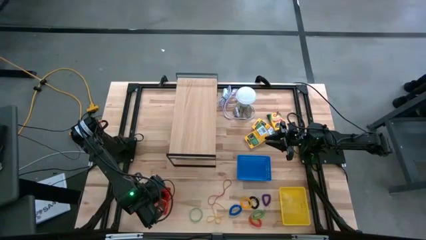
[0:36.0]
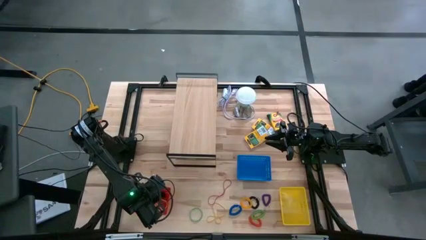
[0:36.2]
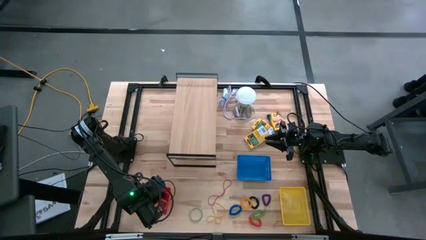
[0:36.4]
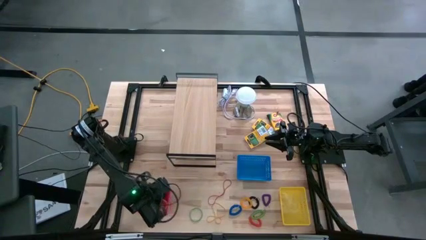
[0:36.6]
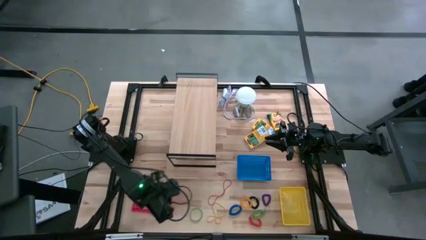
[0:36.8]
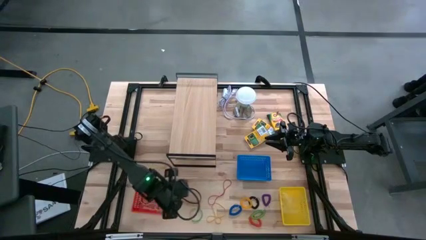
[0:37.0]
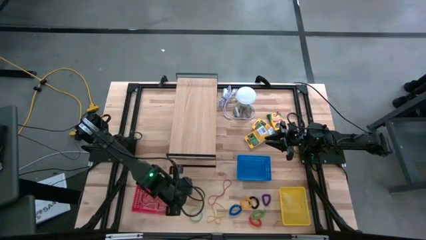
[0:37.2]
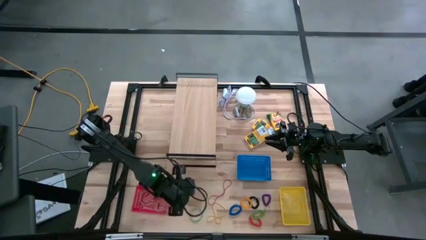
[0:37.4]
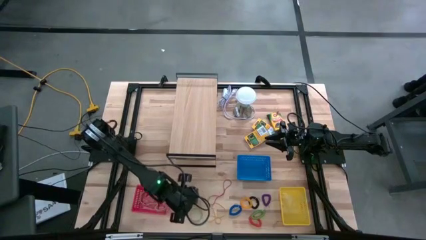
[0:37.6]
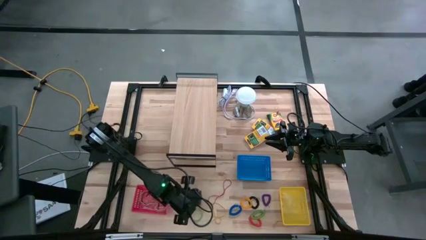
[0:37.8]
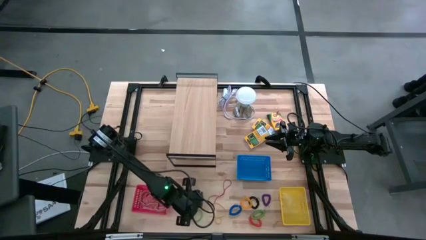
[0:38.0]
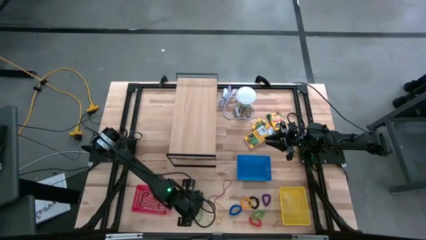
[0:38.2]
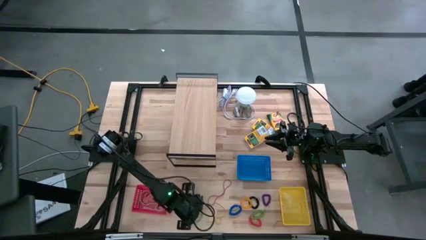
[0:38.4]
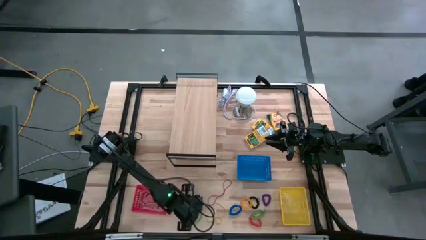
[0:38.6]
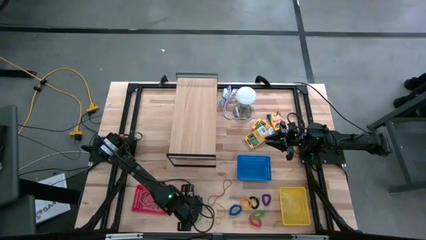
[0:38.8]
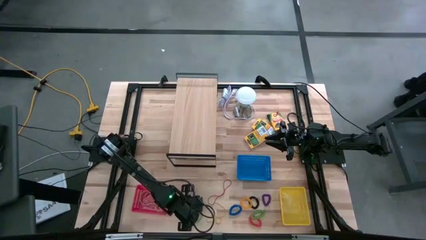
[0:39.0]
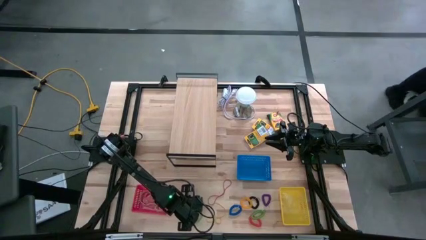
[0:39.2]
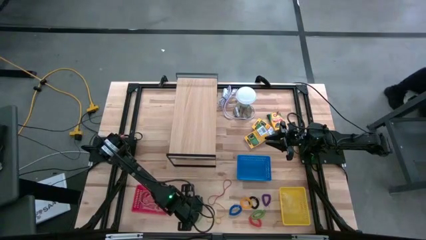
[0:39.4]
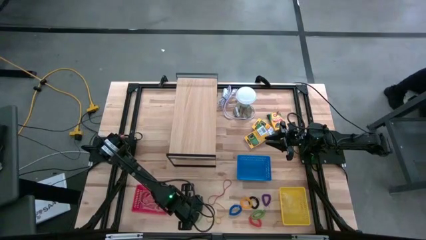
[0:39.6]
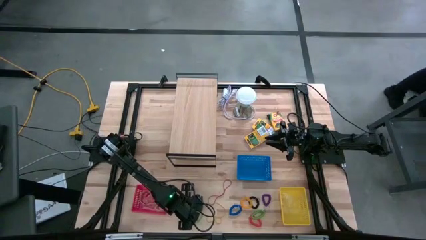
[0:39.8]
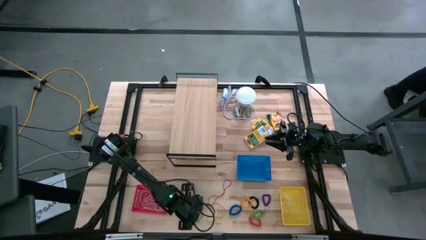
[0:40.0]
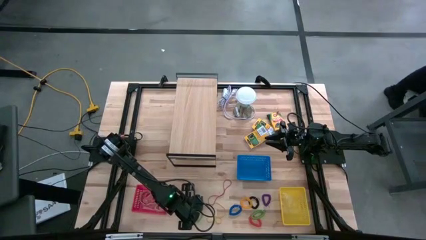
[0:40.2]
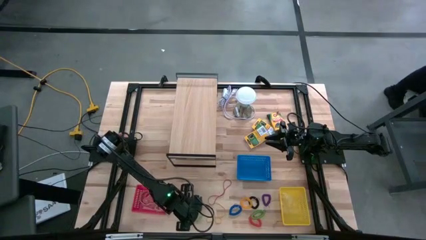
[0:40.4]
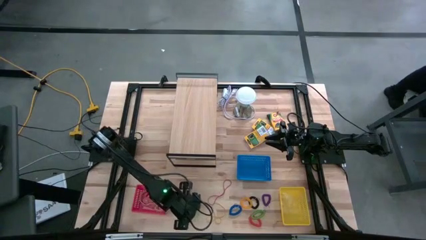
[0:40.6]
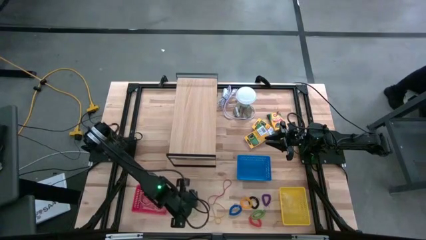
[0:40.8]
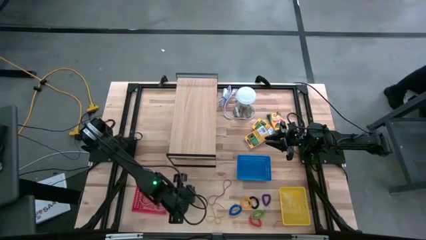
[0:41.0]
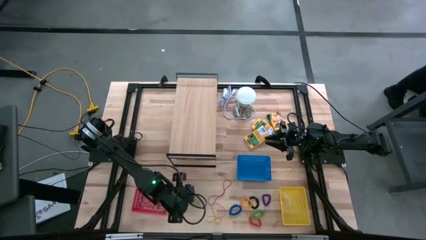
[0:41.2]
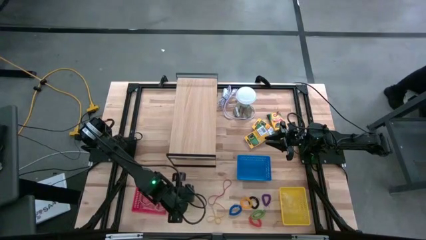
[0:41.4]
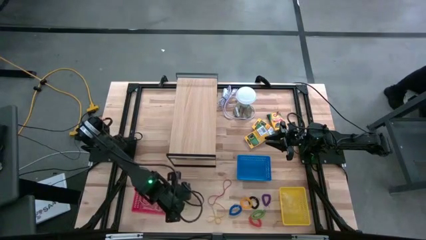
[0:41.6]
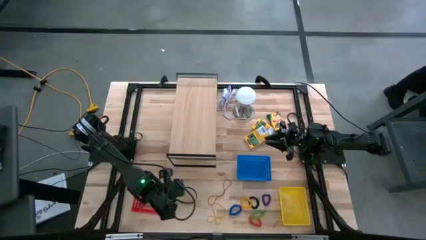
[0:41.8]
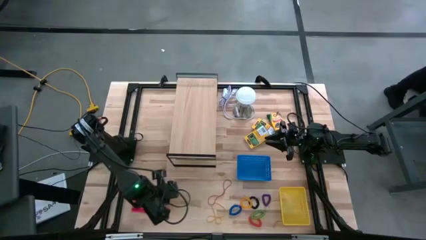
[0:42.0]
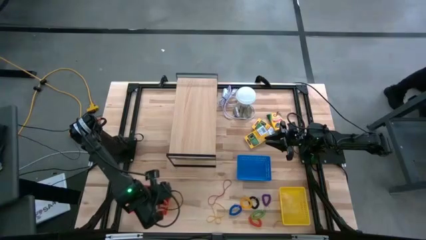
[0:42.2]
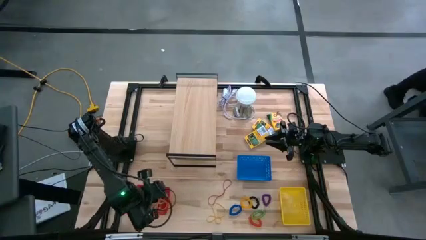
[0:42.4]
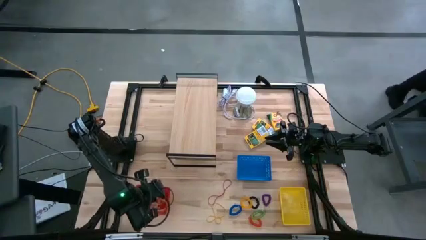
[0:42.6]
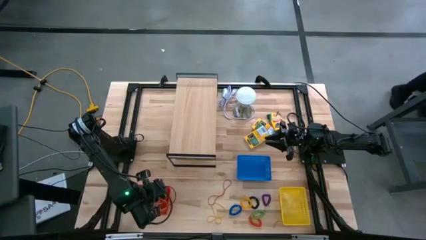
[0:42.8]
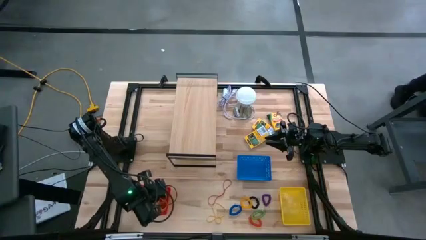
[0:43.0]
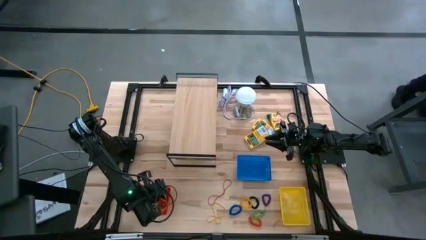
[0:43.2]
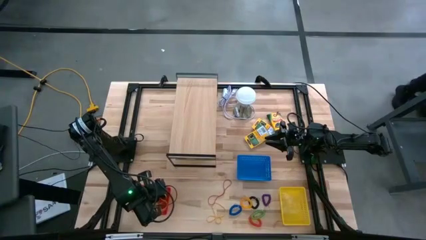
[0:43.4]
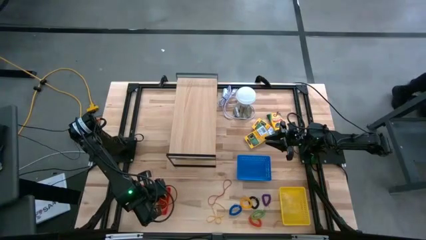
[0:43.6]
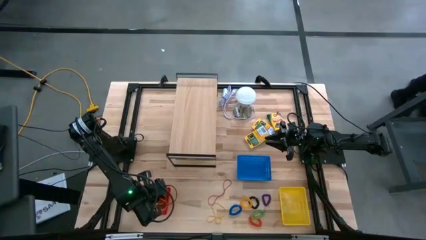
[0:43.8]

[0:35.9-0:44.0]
Task: Pick & Place Office Desk Supplies
Put the green rubber band into the red bin

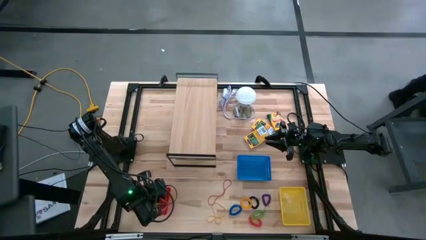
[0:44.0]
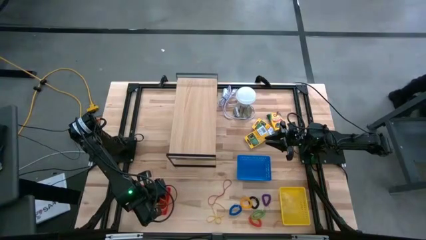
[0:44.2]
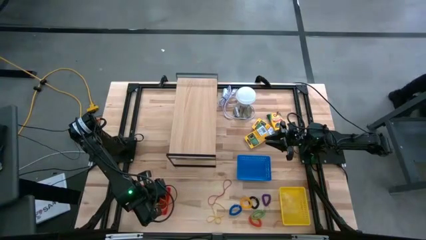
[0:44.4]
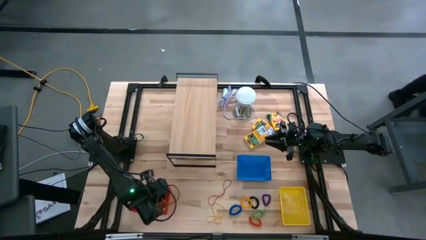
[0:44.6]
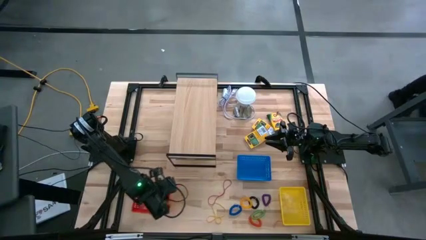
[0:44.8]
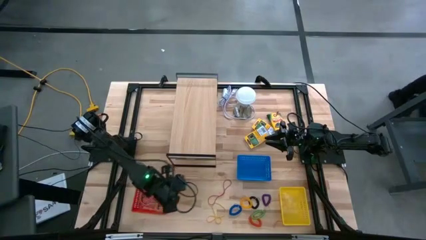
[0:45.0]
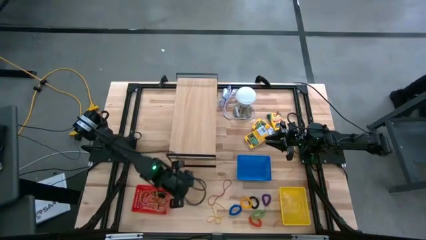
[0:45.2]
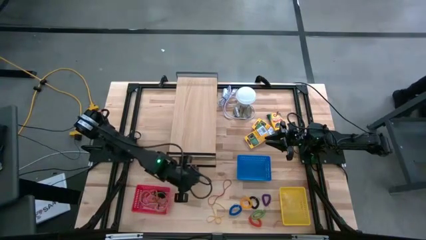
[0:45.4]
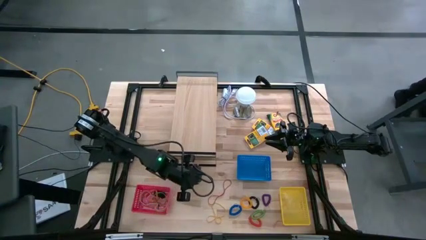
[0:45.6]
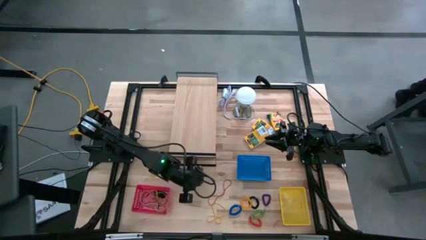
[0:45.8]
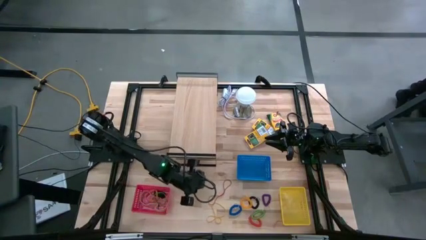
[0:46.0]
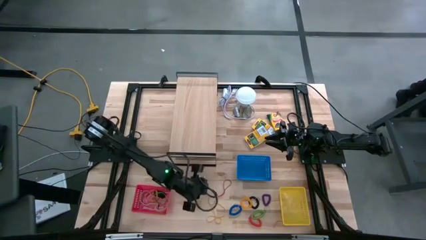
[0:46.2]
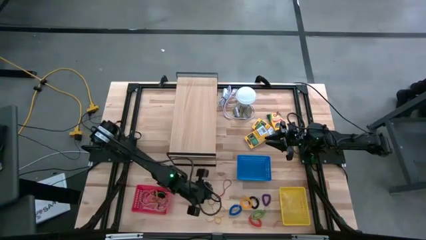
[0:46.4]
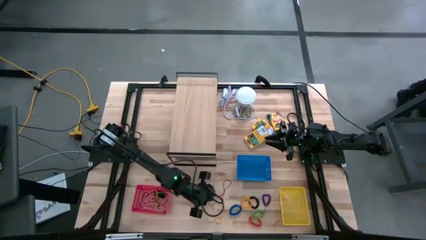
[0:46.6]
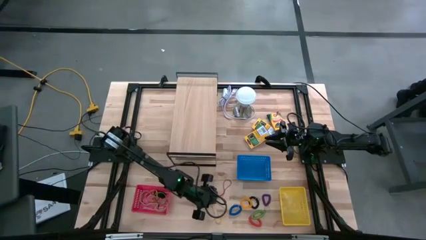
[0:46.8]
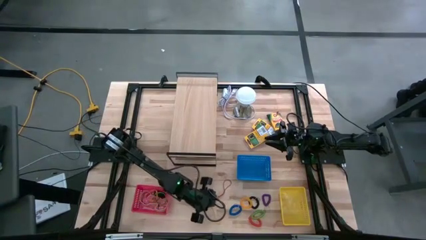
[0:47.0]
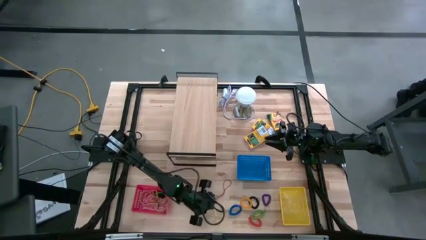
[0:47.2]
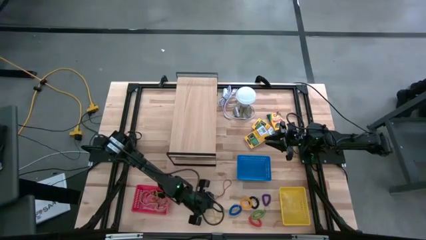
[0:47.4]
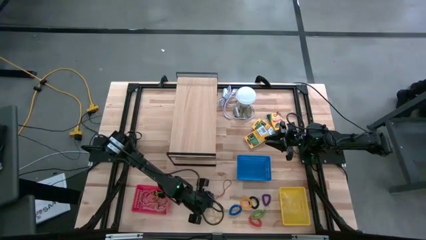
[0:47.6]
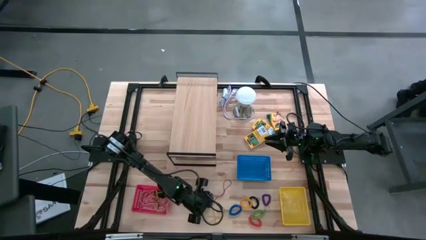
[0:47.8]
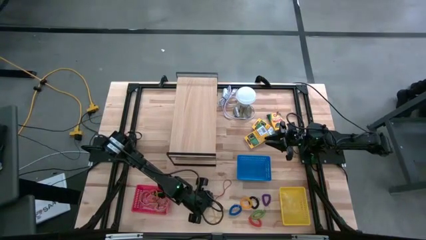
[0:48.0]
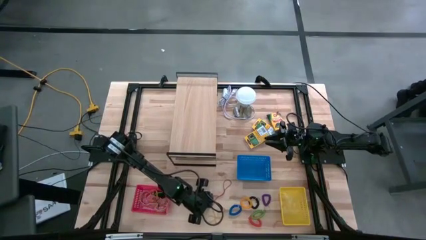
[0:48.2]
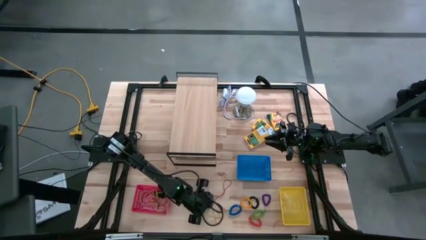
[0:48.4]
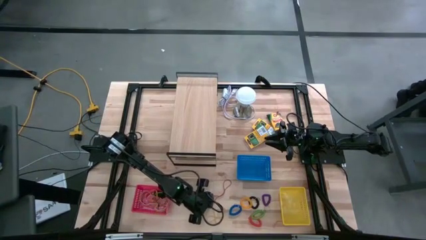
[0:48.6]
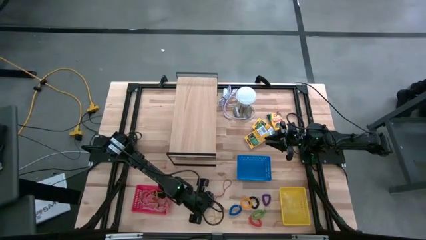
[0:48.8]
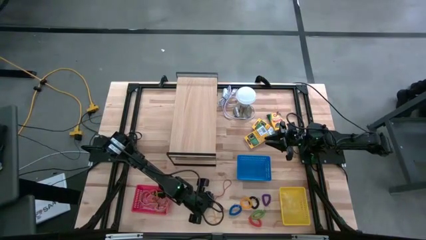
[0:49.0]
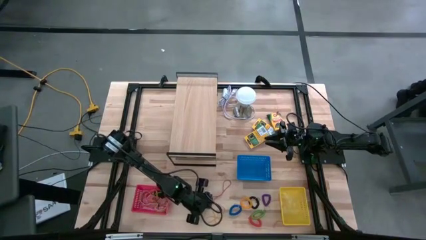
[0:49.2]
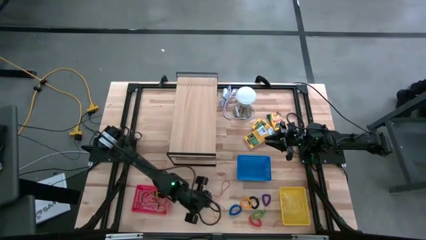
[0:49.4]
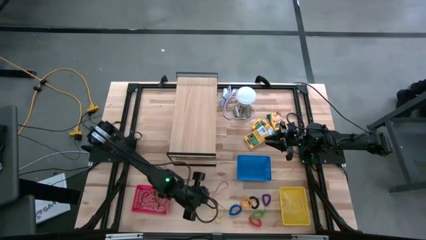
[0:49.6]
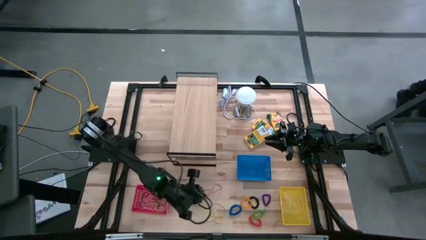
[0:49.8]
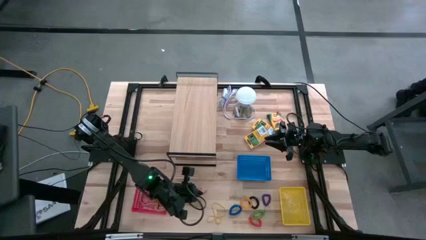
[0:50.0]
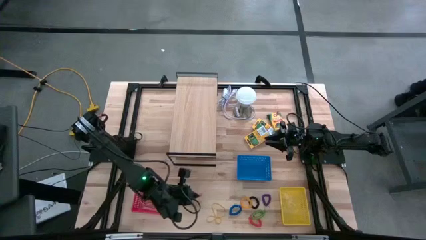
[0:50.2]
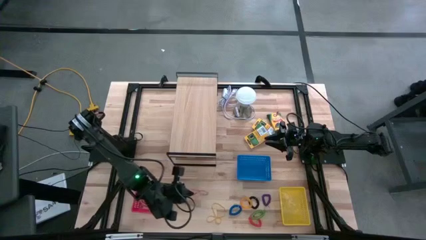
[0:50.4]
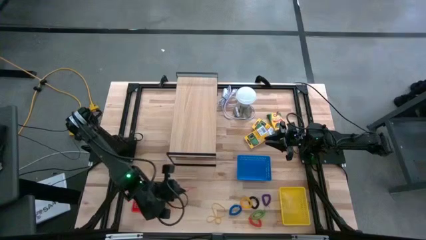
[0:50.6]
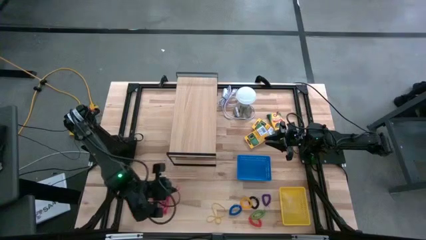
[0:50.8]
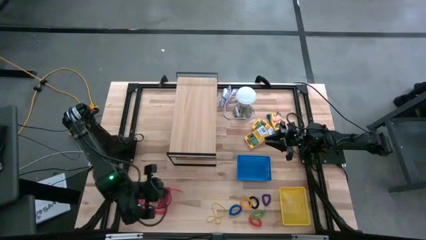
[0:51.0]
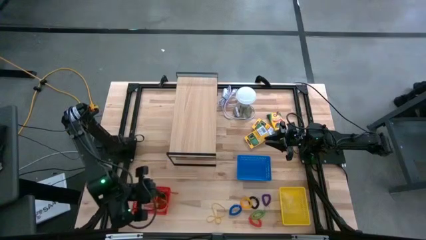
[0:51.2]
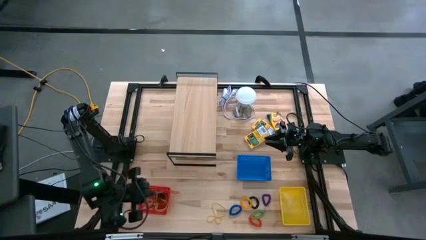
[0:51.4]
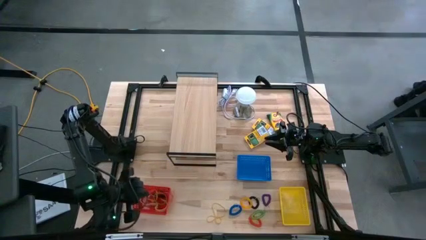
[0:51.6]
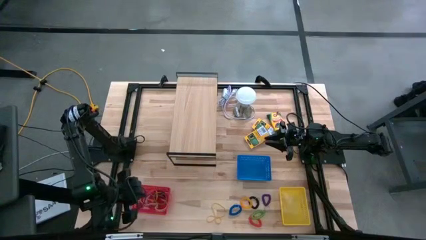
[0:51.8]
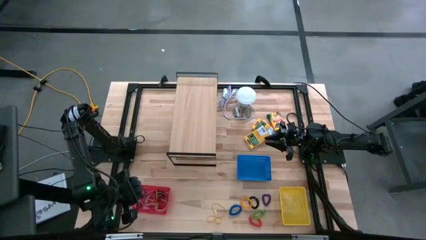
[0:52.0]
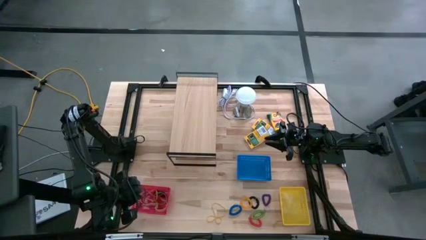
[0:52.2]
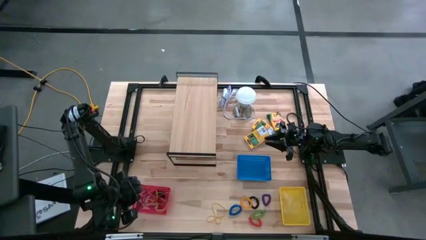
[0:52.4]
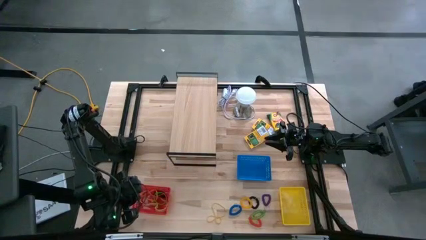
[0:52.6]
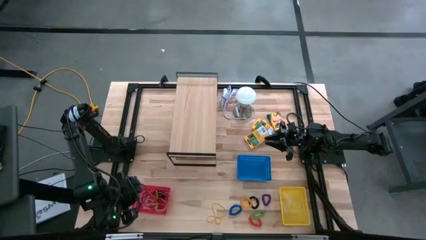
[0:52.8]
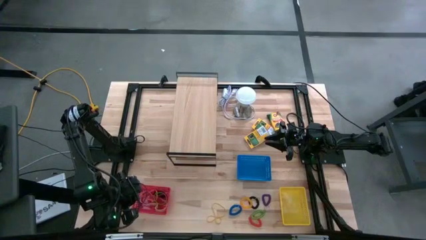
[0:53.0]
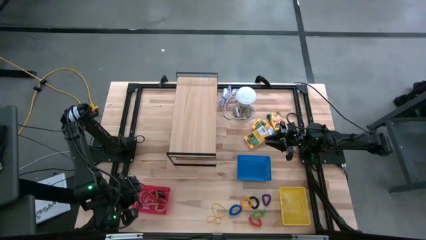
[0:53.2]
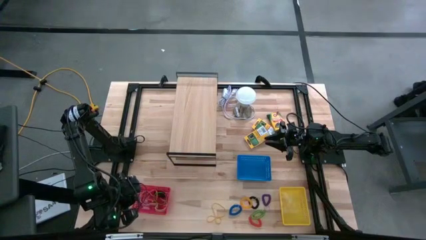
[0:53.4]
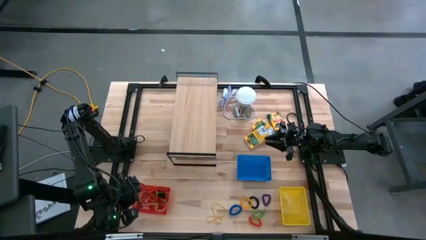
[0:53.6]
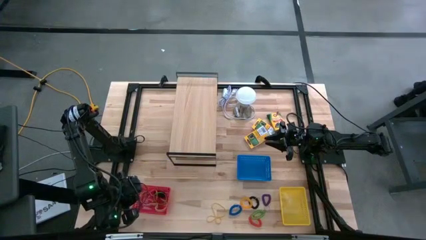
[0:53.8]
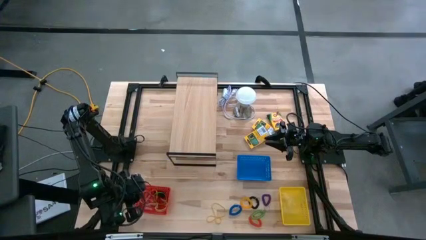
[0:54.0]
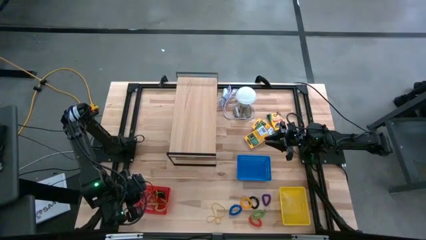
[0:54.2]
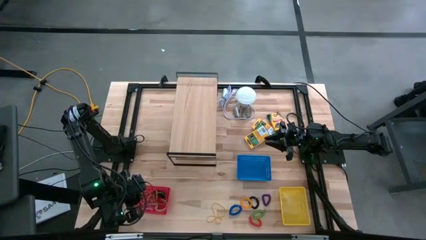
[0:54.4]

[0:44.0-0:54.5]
Put the red rubber band into the red bin
